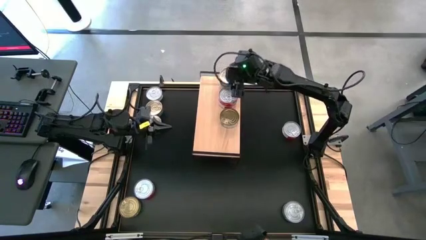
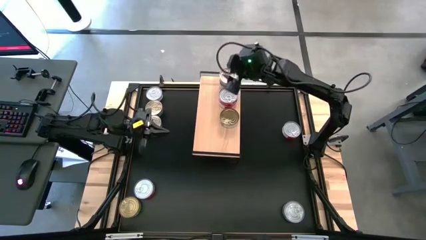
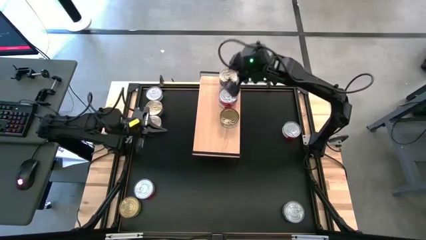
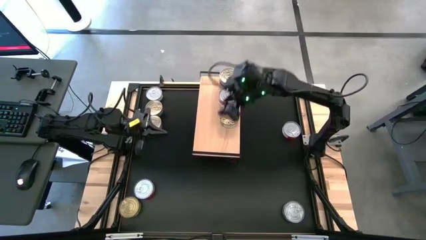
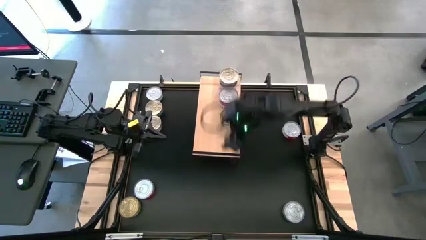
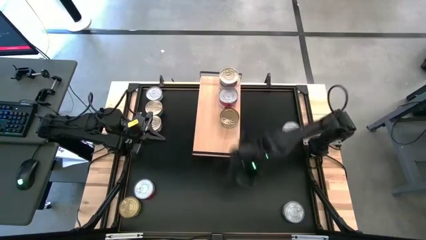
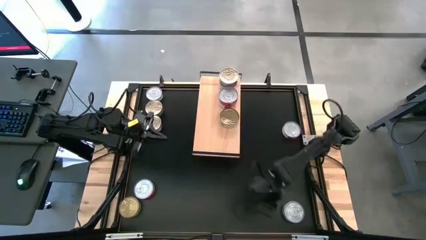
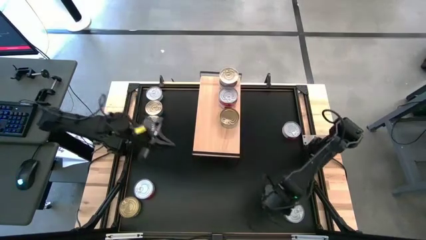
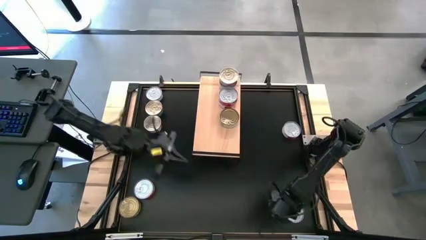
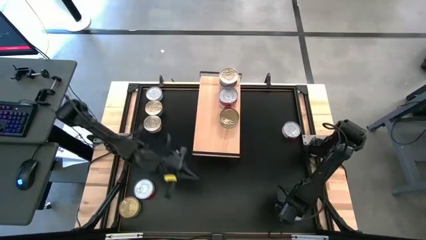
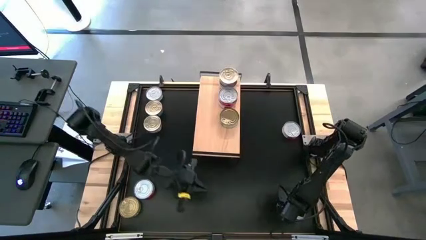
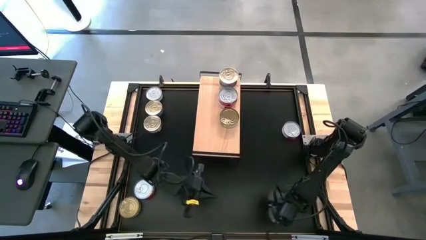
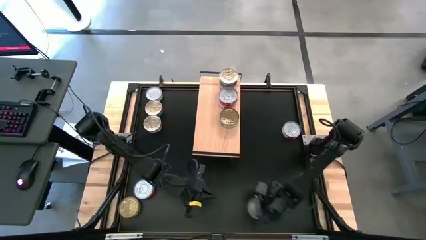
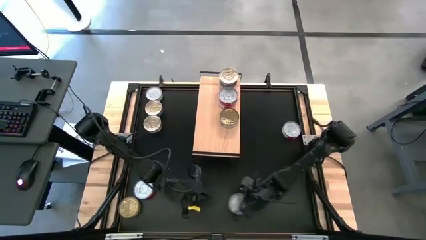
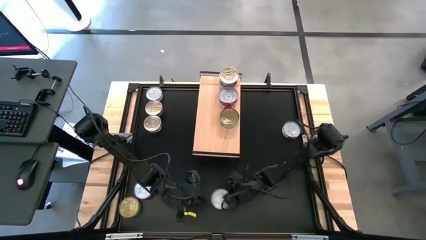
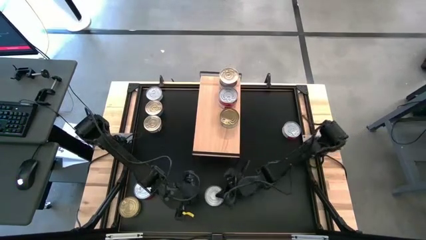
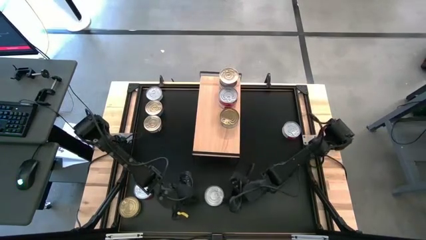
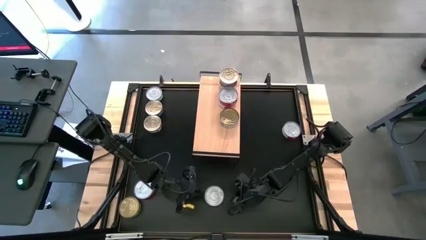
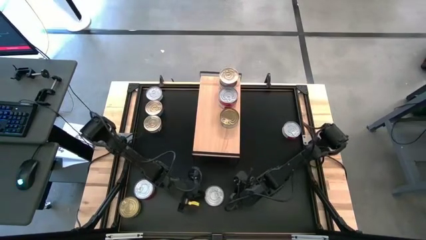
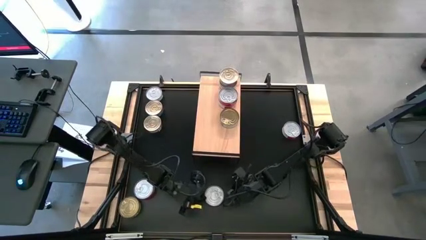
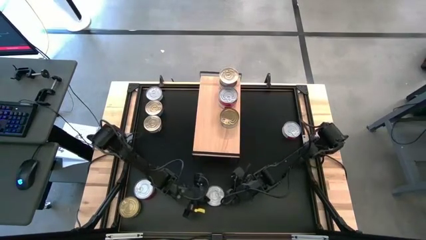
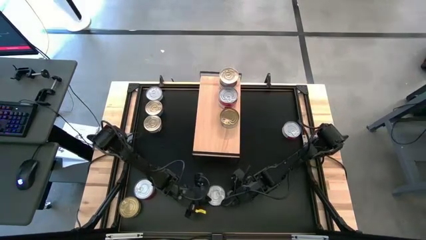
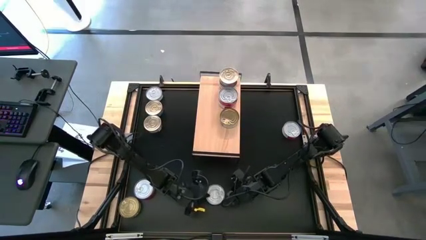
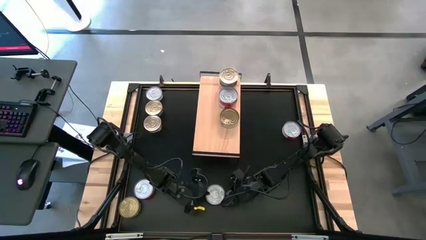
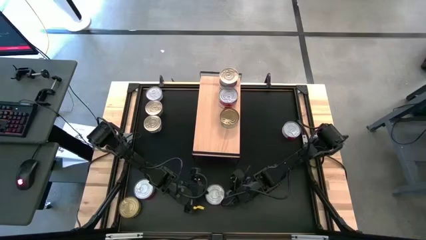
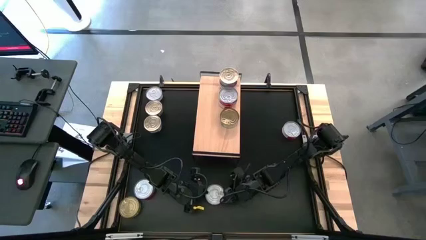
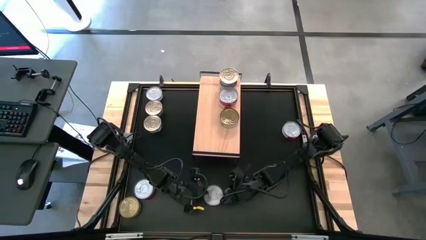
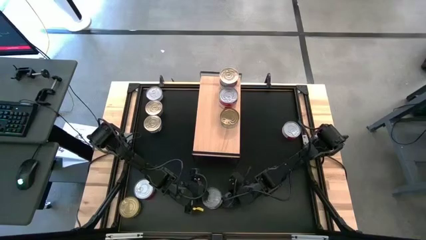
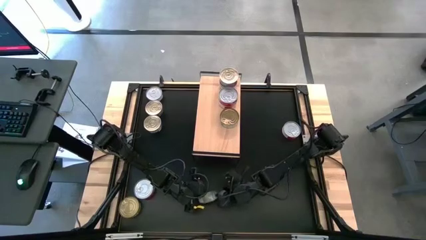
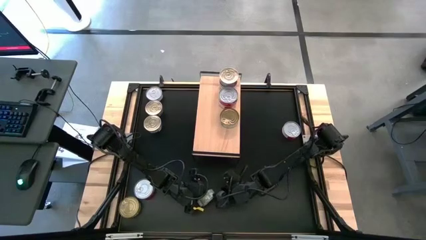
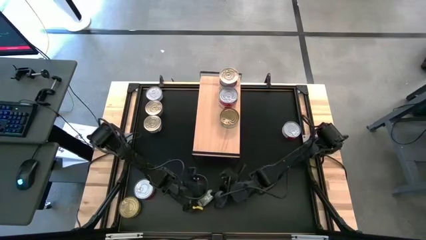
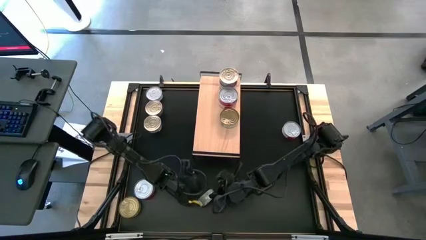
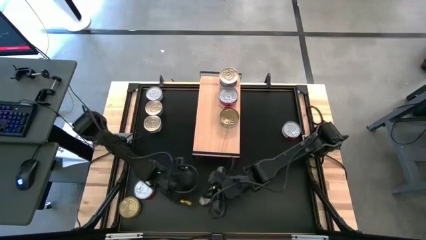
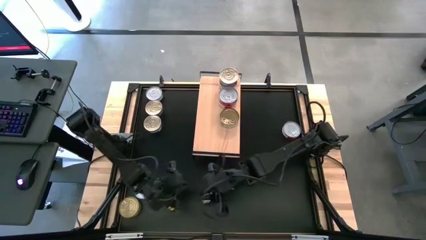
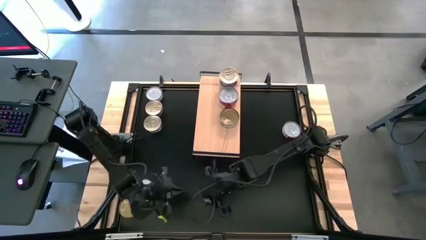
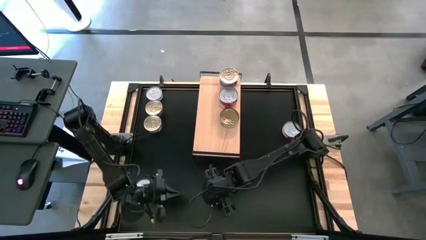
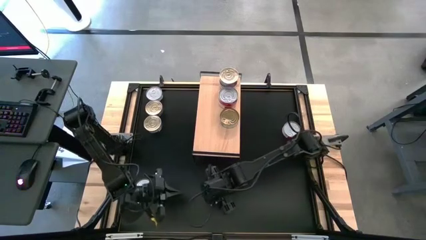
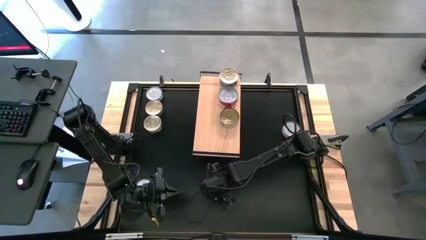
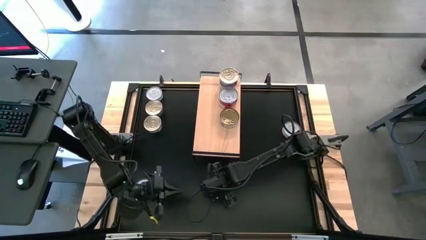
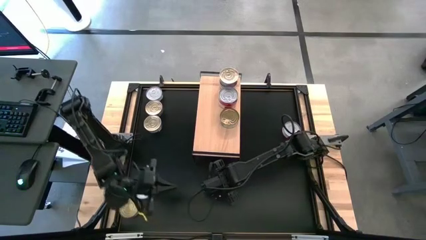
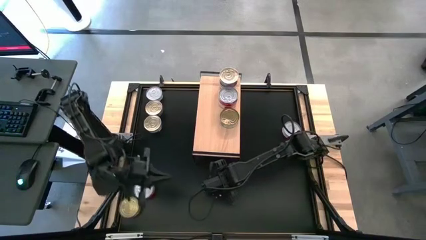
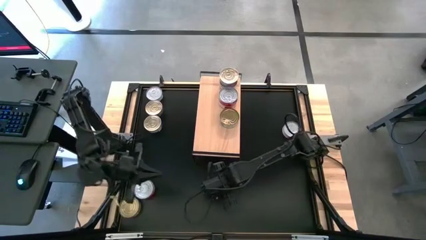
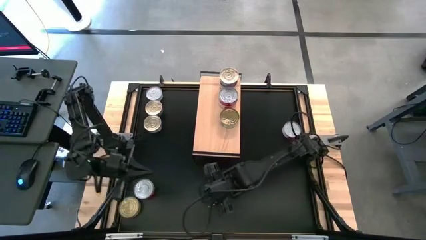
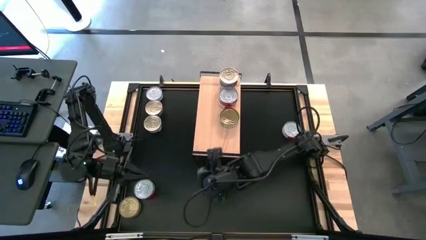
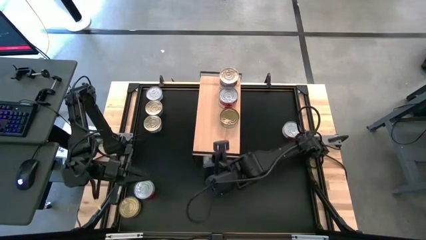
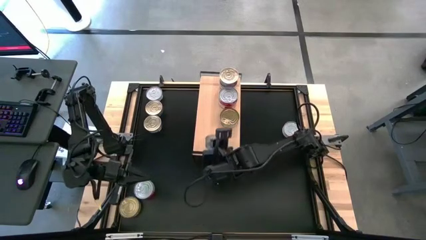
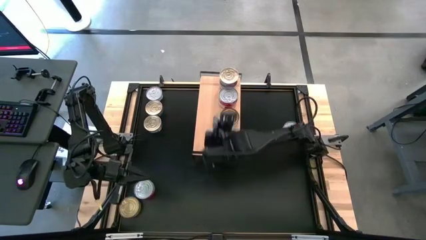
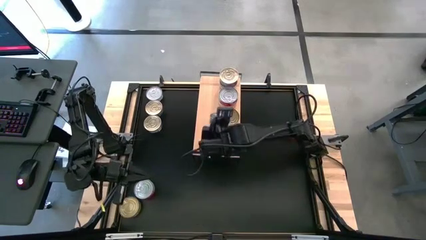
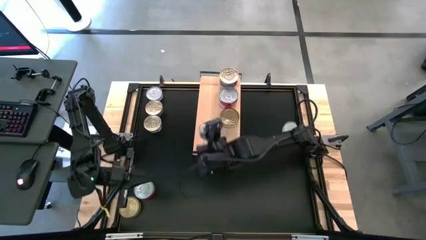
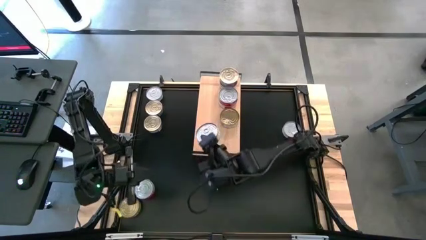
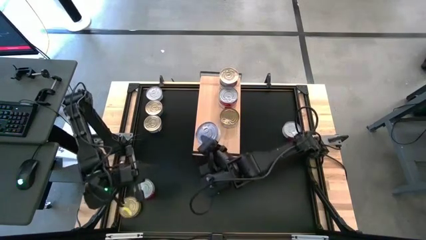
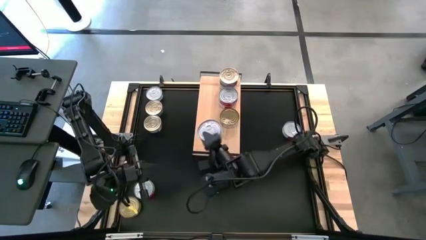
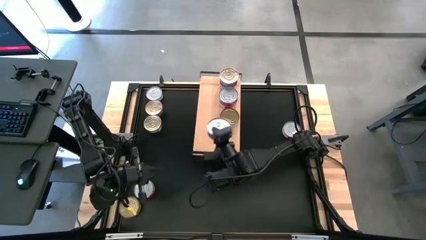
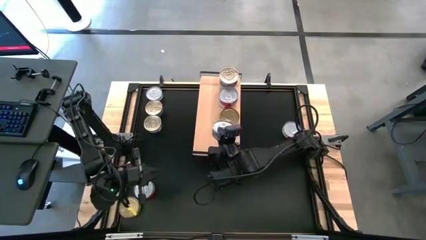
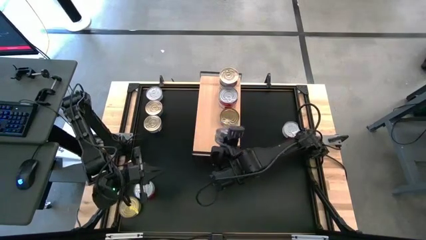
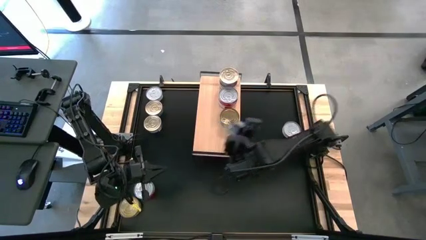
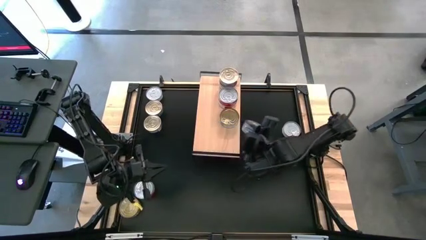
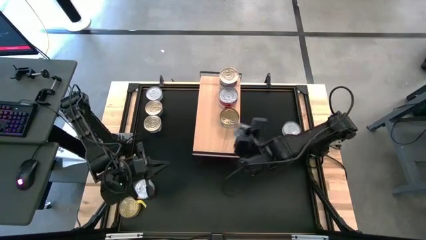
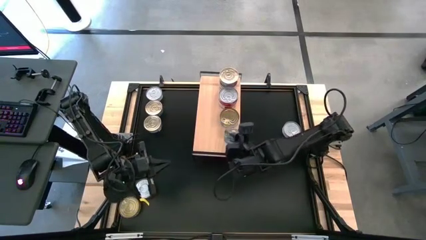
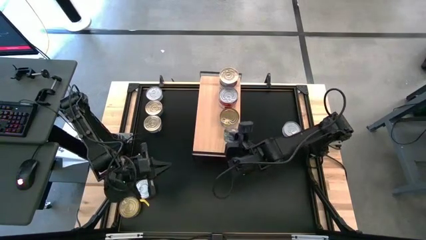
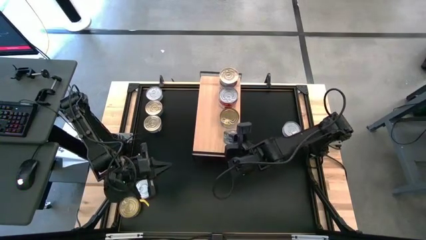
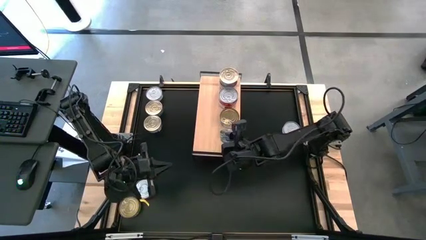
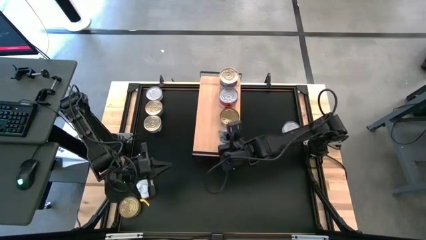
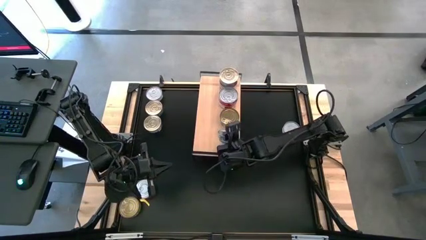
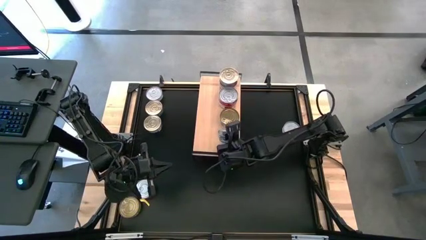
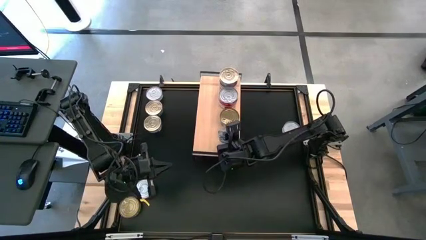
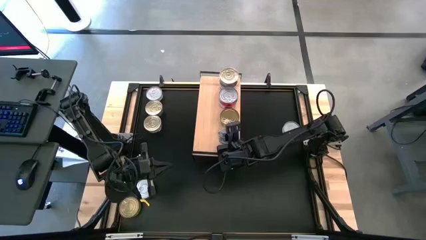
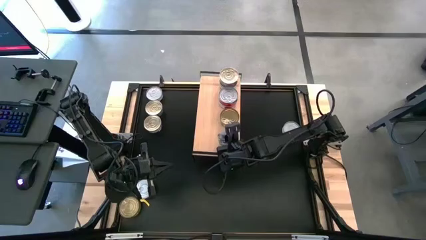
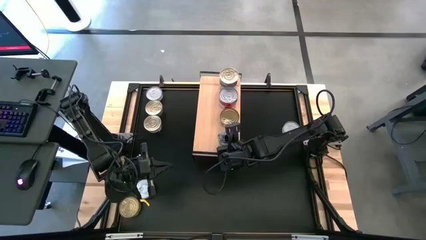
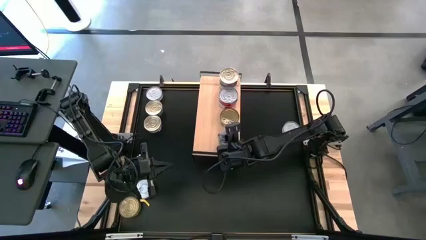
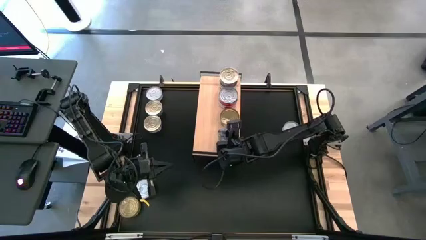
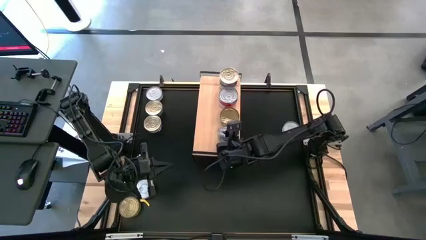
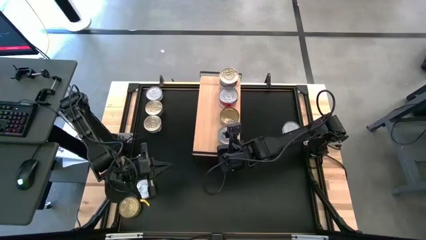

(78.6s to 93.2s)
Task: Stack canned seafood by type on shelf
Put the dark green tuna can on the shelf

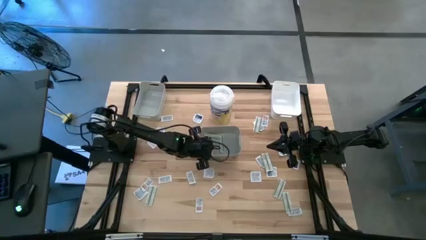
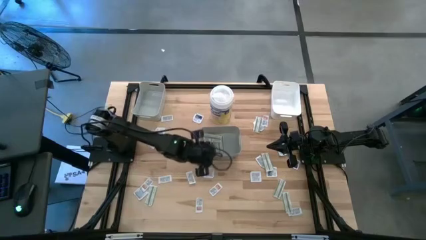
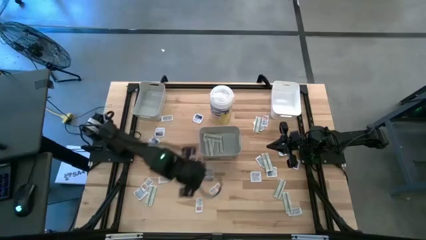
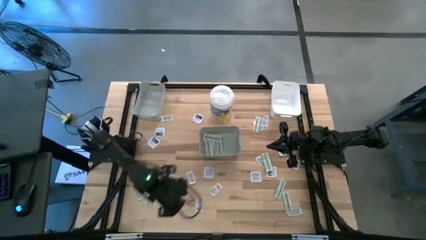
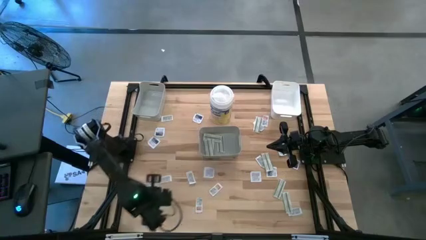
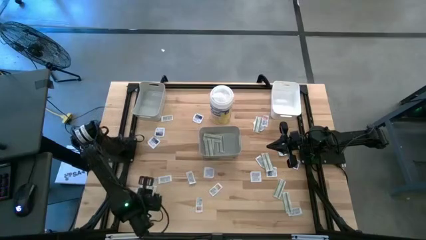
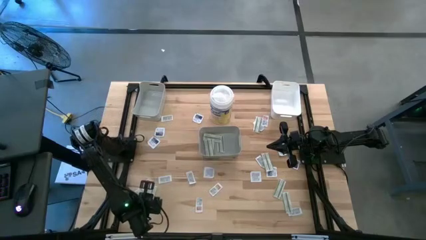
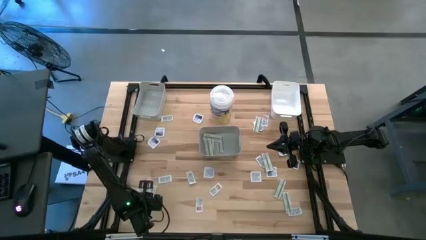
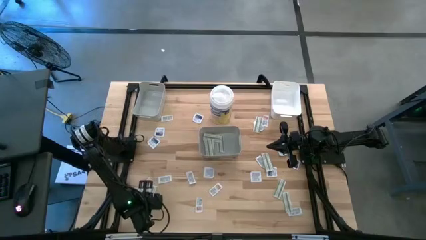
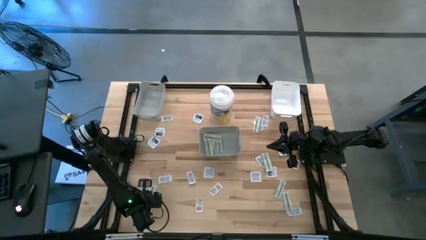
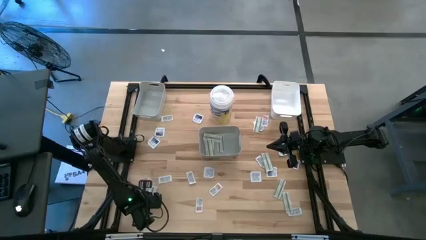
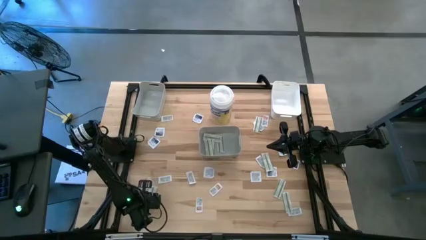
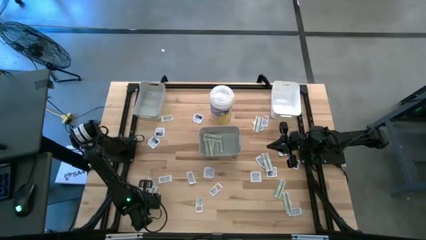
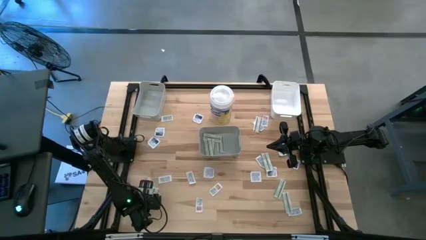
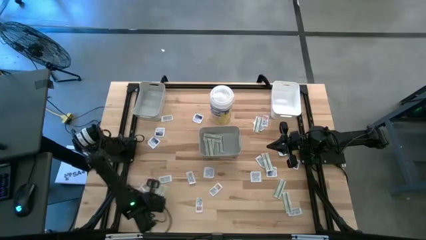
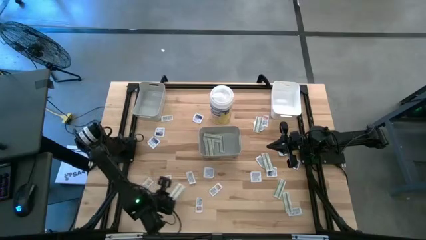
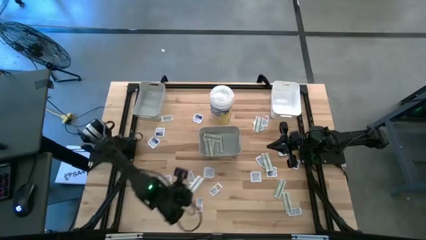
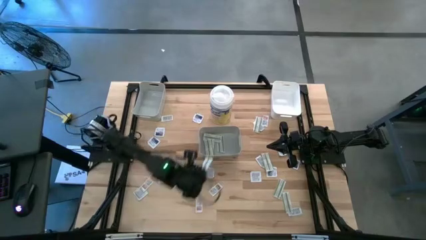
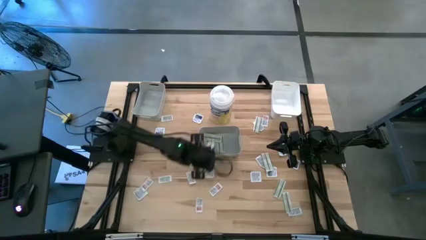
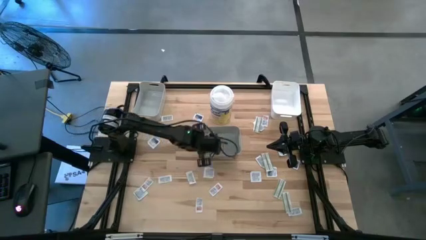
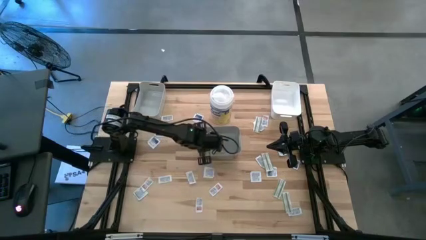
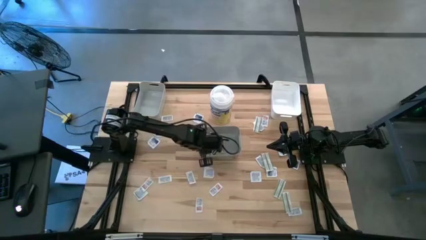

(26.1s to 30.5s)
Task: Pick & Place First Aid Supplies
Put the bandage into the bottom gray bin
